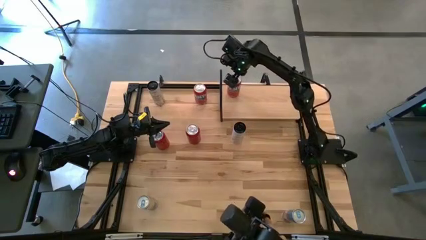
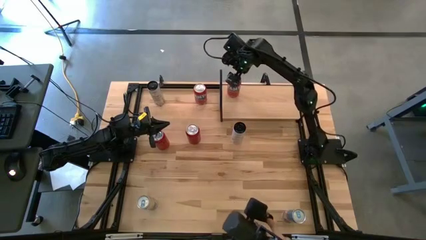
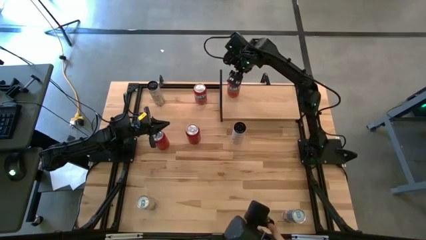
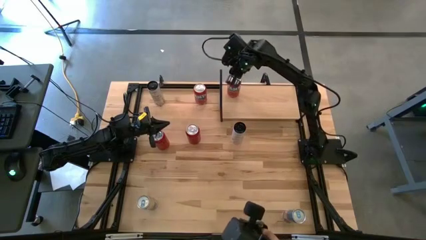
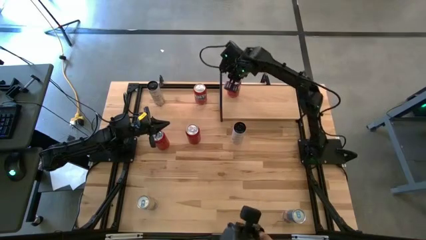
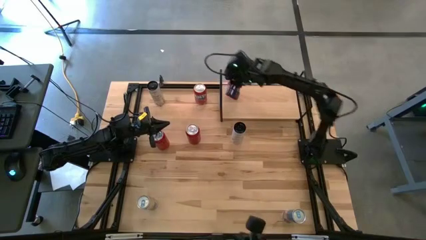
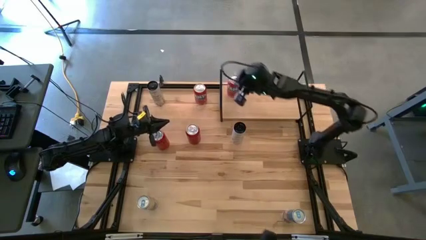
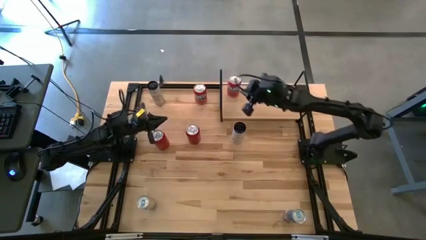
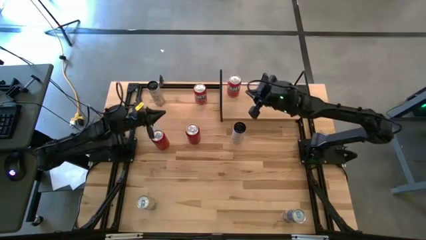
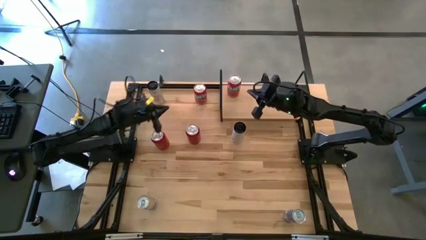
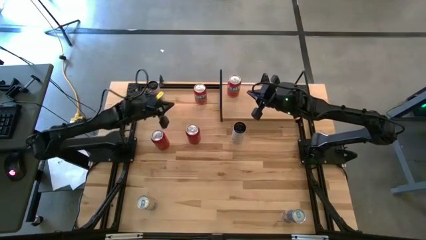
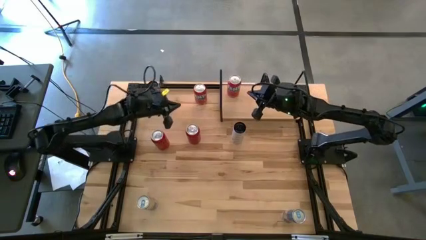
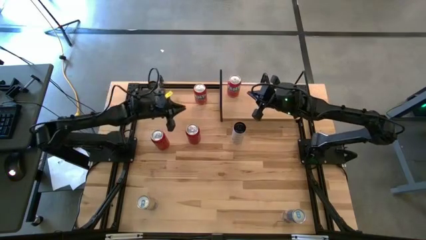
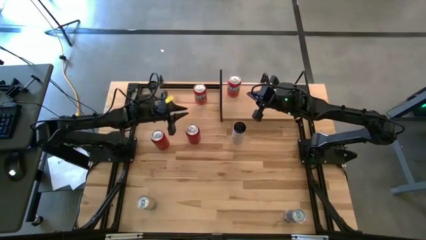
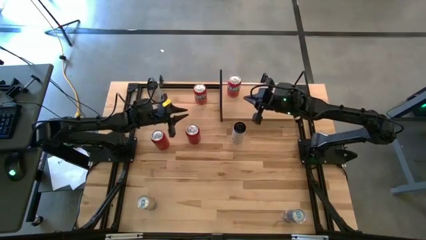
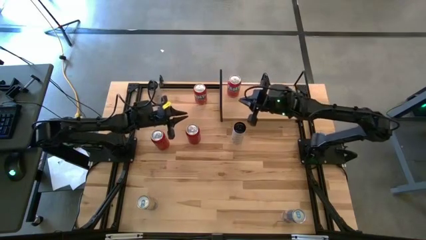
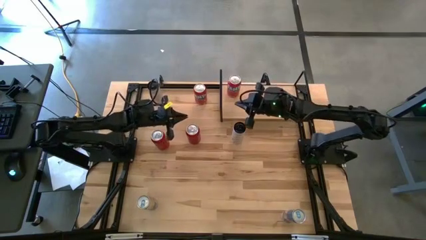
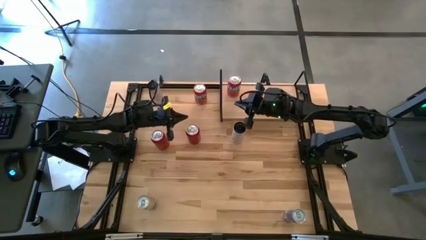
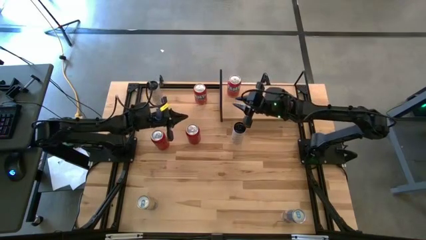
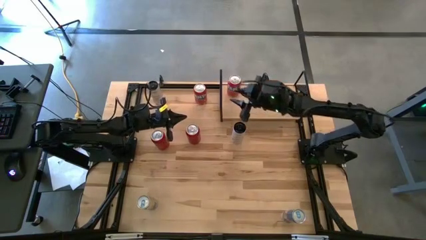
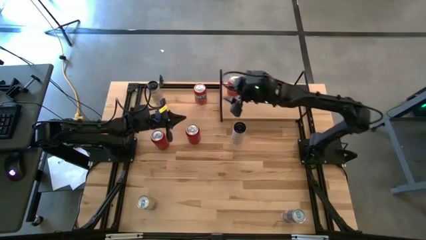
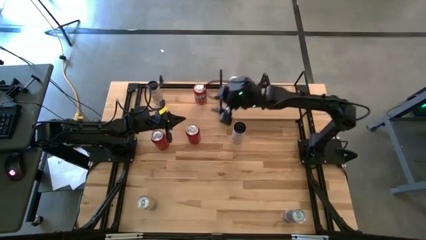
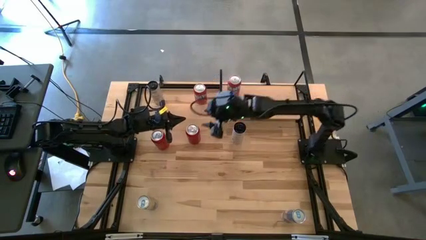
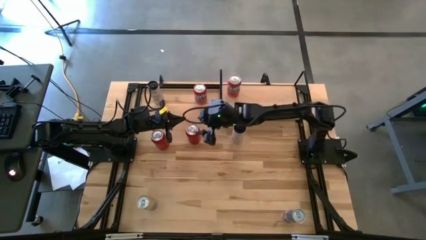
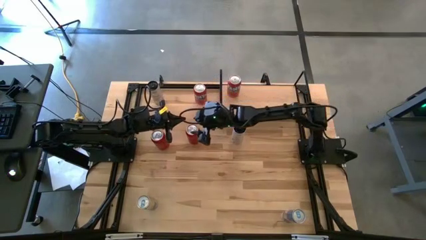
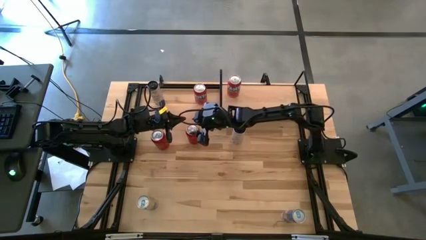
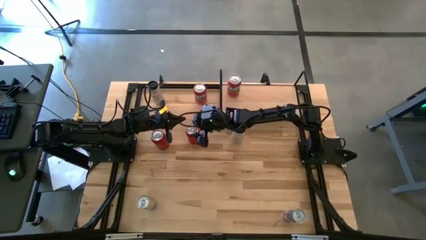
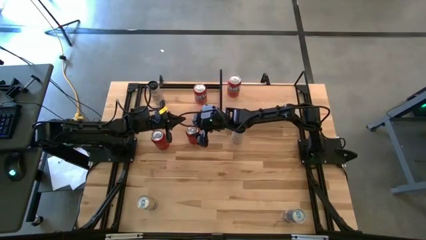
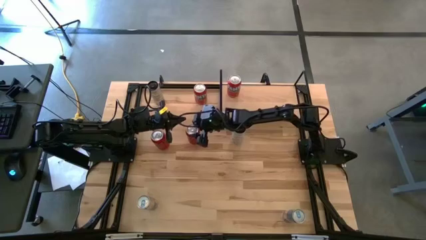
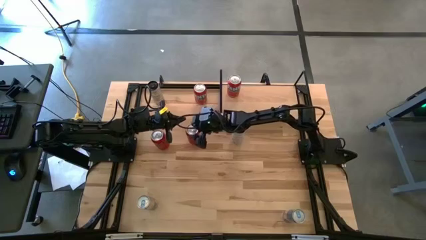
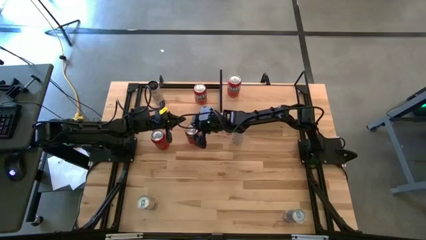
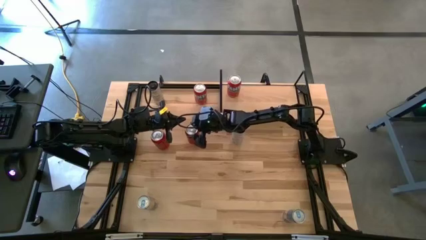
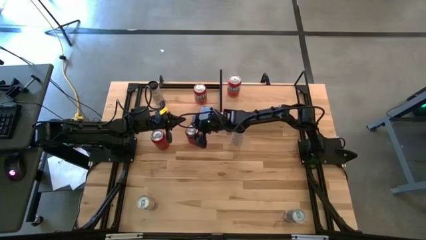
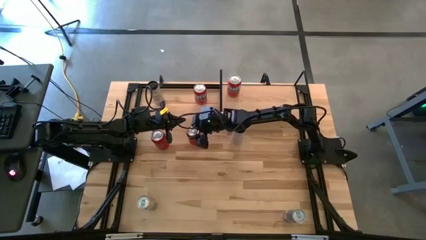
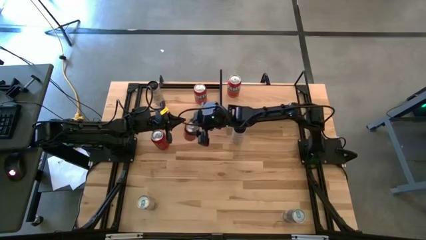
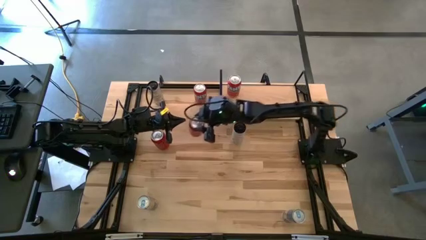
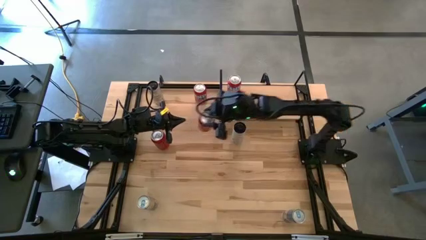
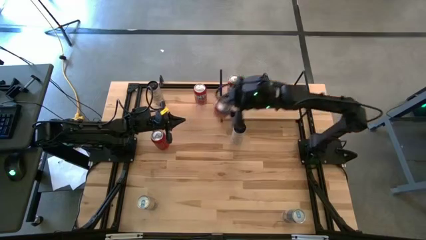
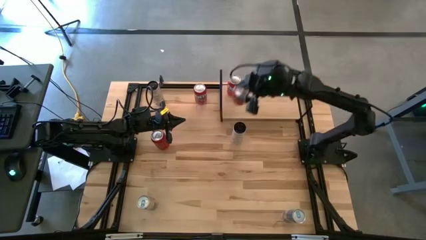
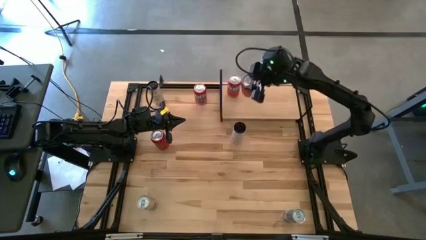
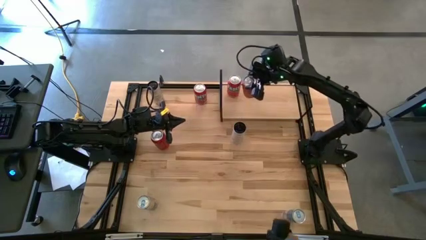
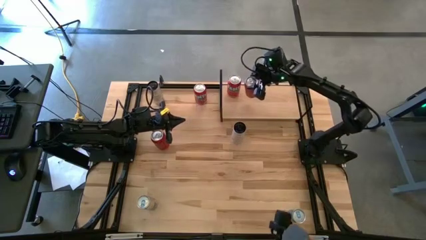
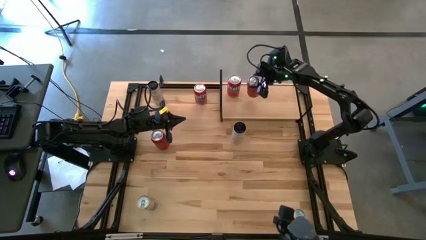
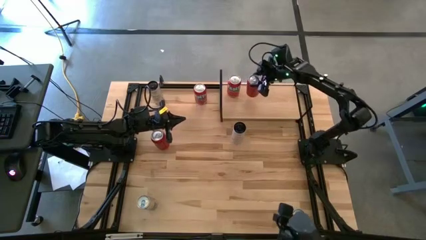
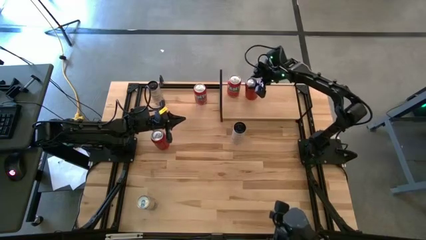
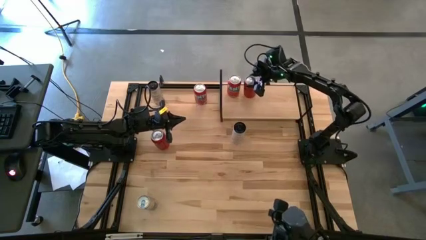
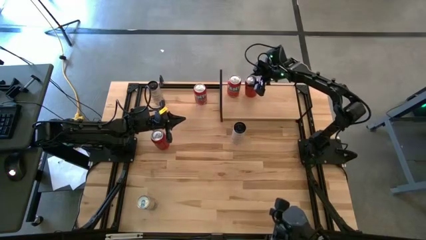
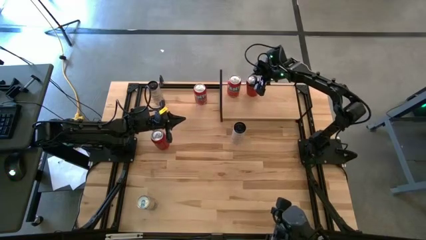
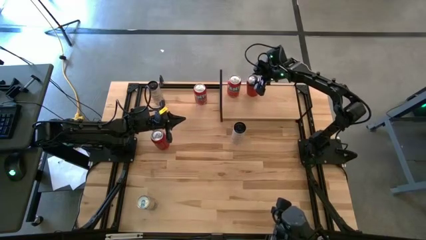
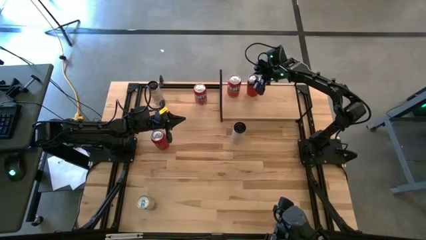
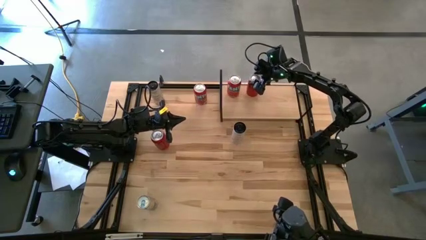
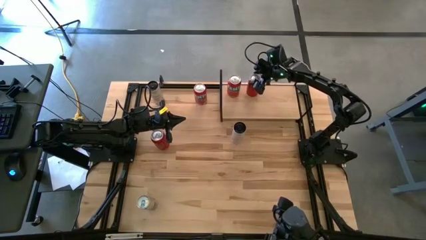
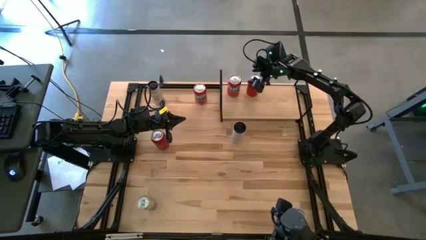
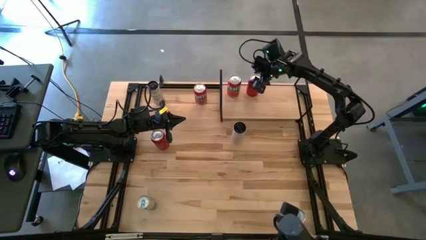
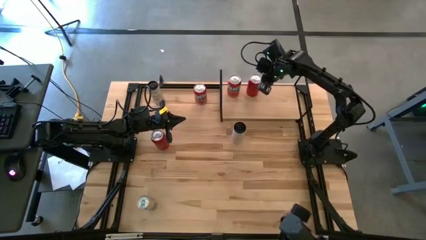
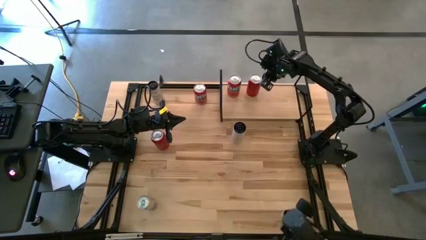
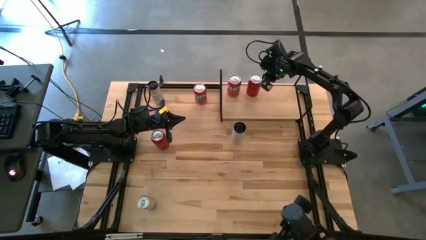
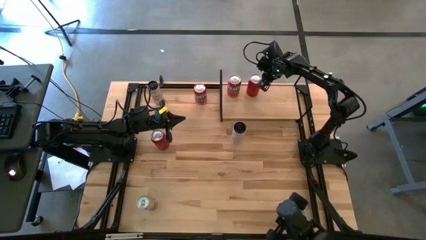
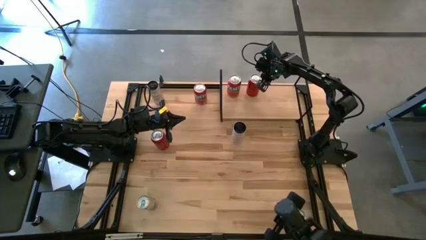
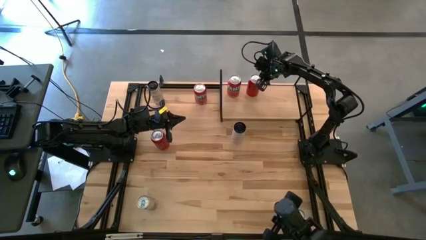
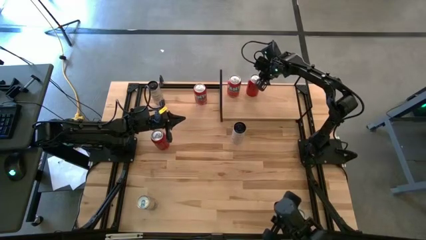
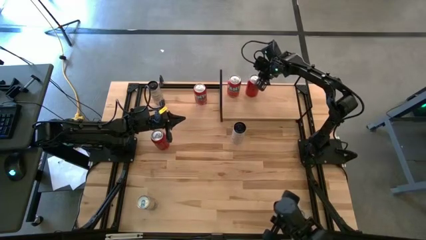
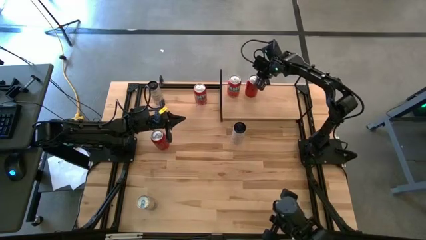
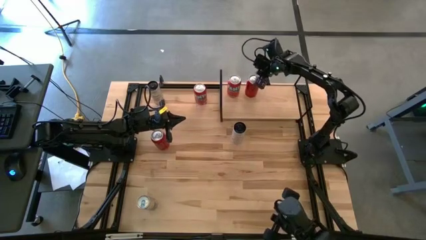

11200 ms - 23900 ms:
Task: Place canned beverage on shelf
Put the right red black soda can on the shelf

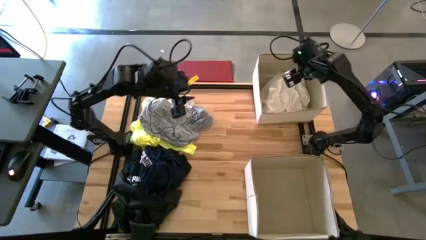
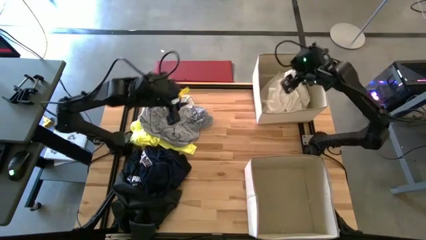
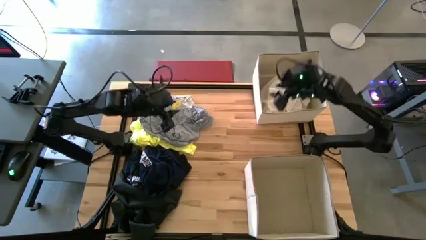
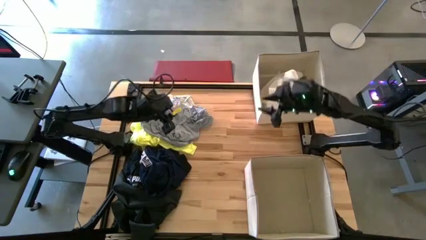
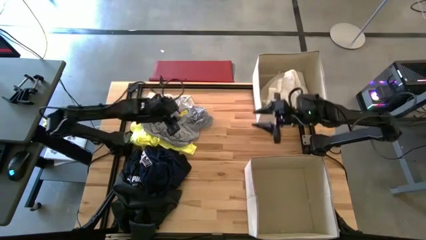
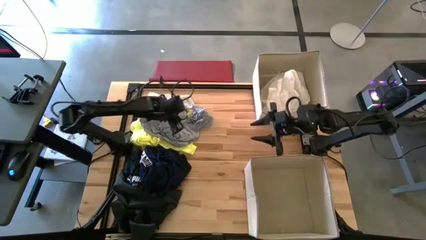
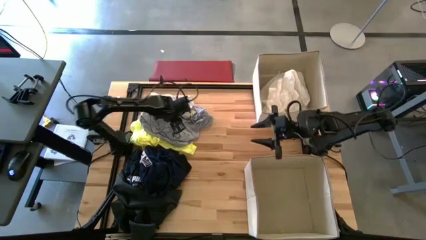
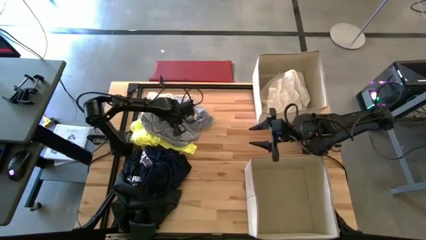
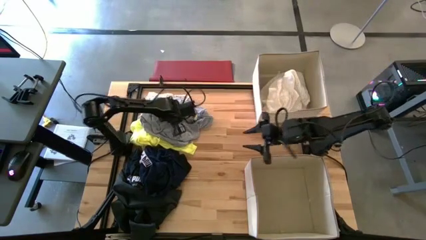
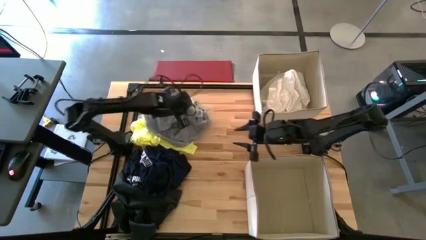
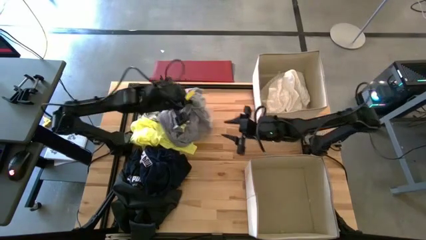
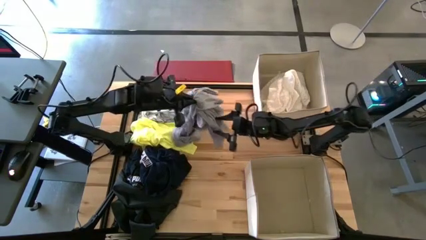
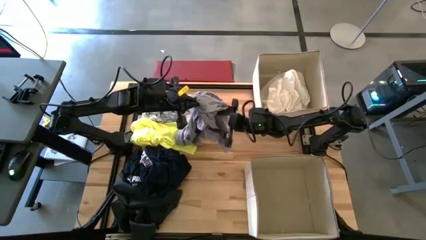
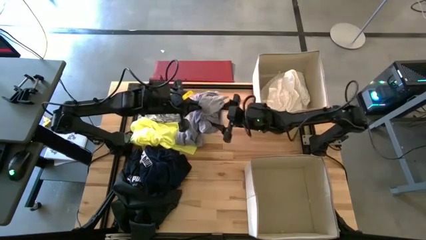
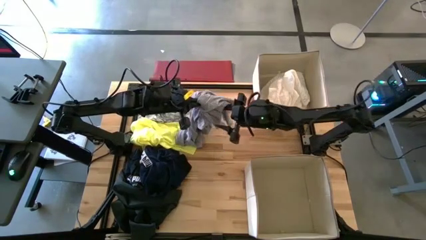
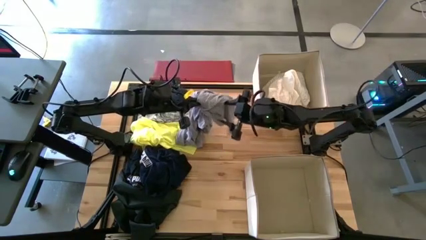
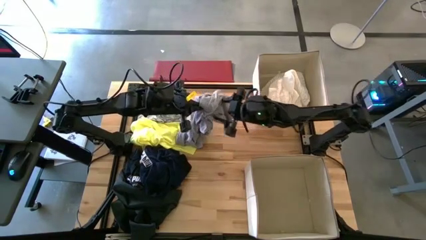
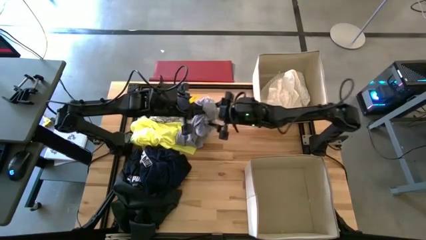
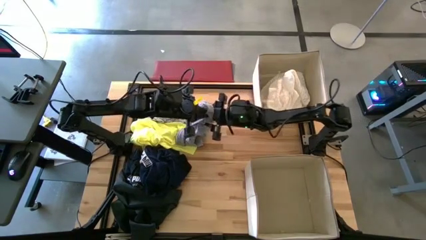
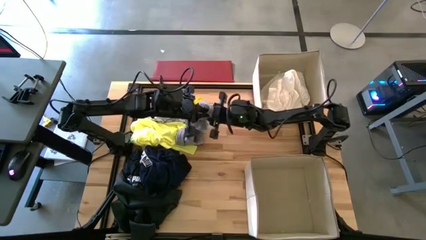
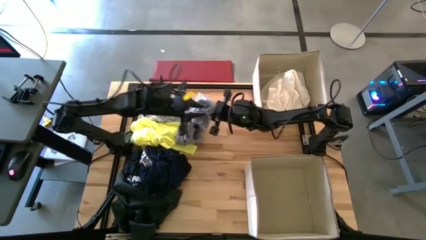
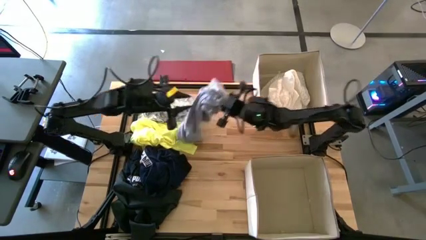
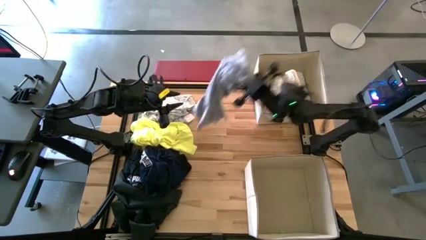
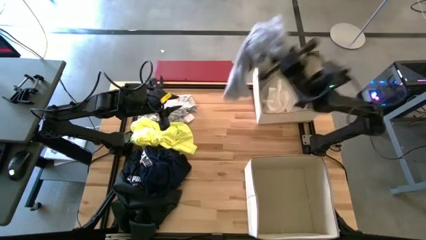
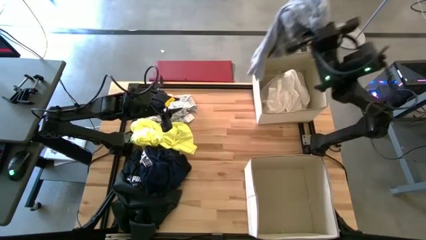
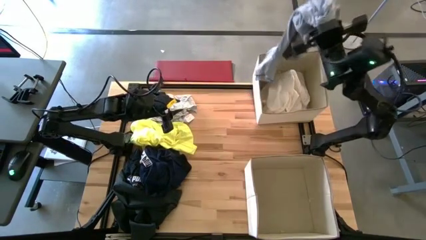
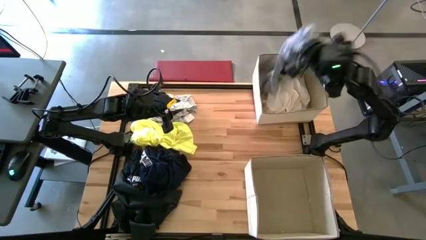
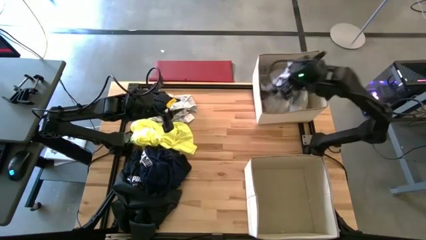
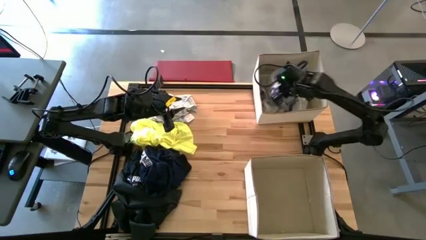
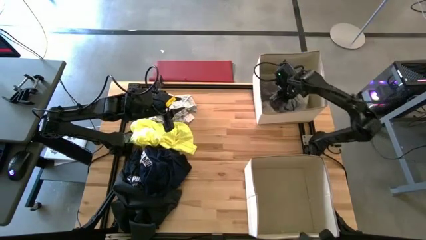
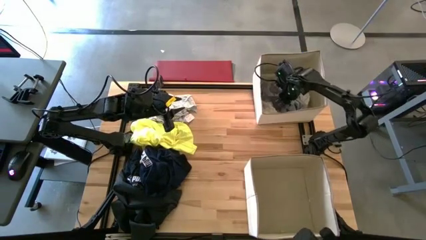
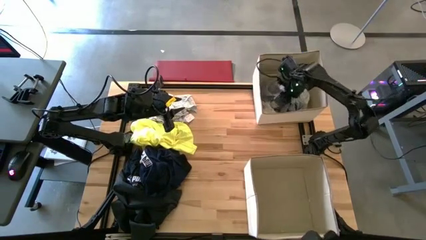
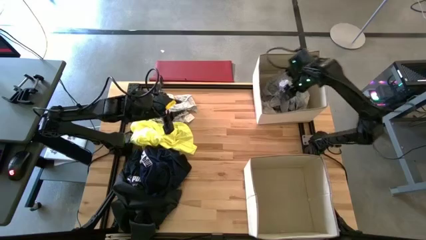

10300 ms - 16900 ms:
Task: Sort clothes
Put the gray shirt in the top white bin
